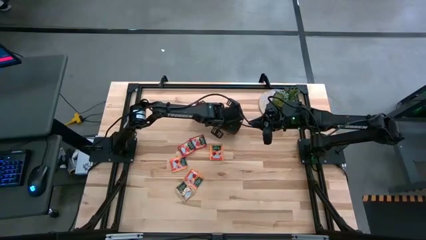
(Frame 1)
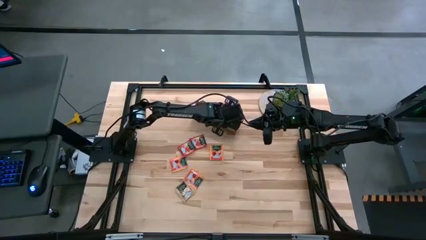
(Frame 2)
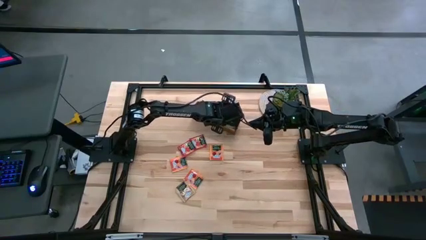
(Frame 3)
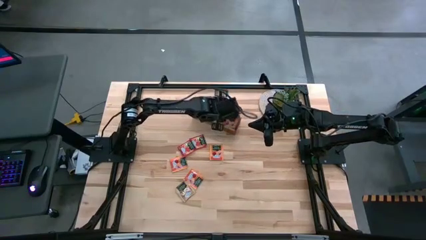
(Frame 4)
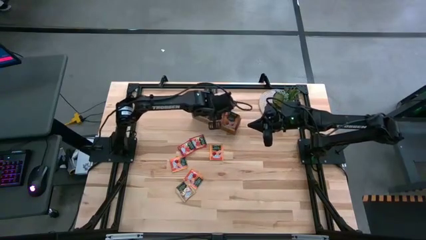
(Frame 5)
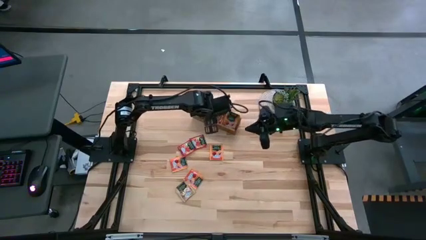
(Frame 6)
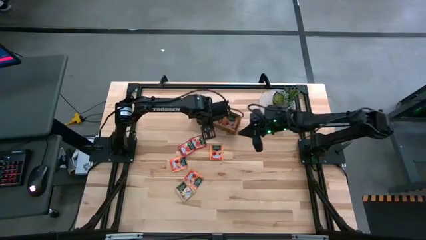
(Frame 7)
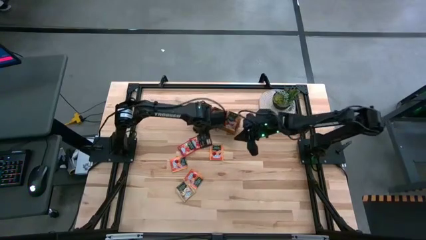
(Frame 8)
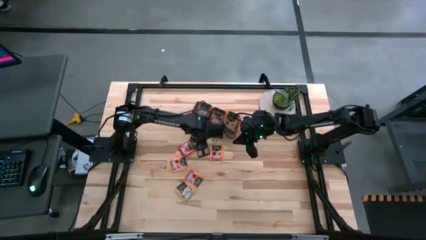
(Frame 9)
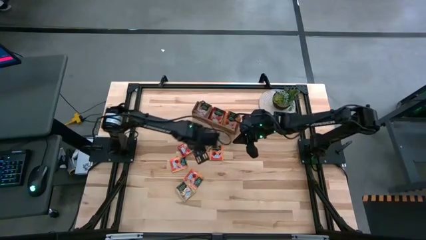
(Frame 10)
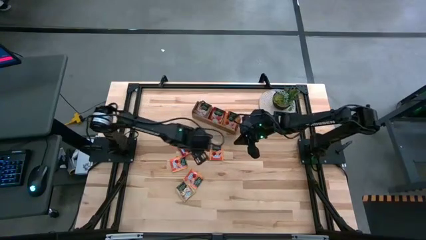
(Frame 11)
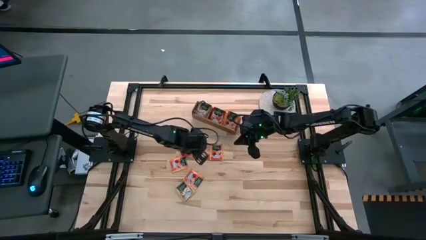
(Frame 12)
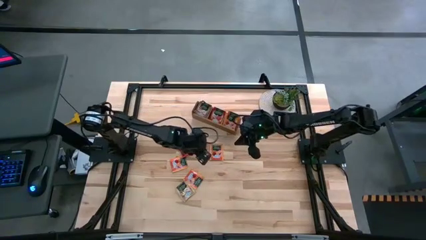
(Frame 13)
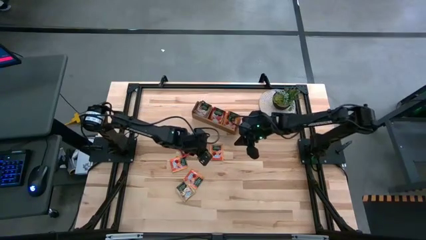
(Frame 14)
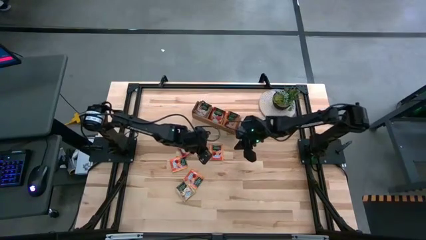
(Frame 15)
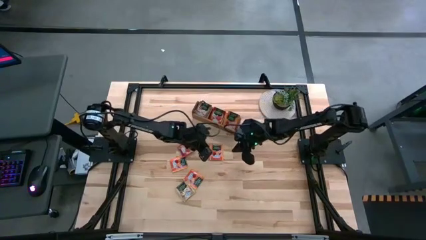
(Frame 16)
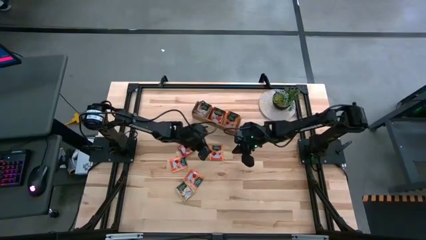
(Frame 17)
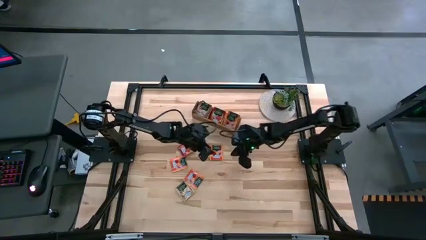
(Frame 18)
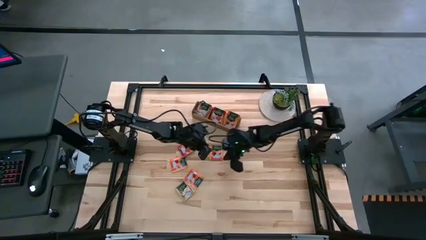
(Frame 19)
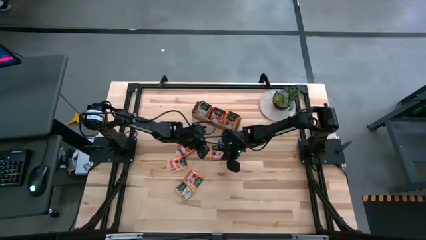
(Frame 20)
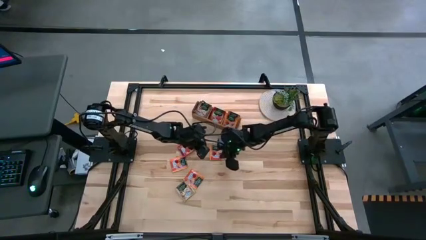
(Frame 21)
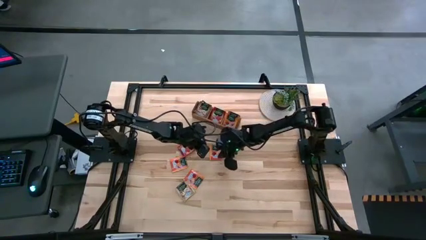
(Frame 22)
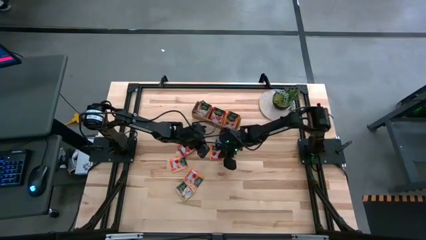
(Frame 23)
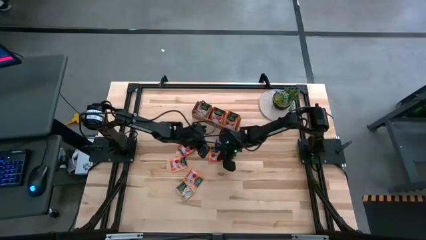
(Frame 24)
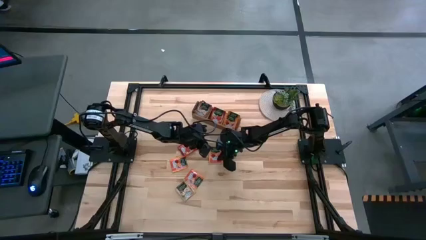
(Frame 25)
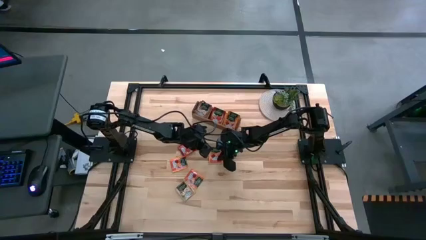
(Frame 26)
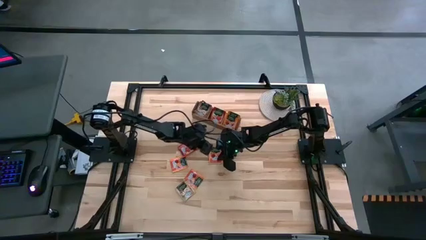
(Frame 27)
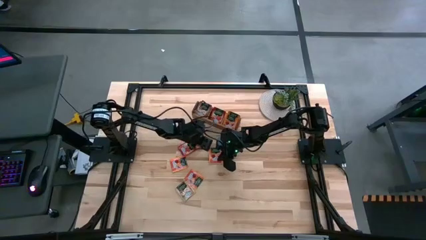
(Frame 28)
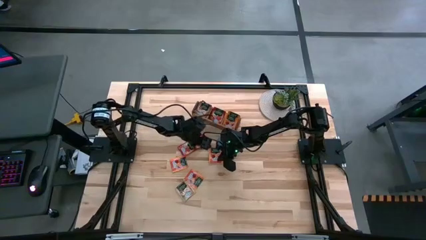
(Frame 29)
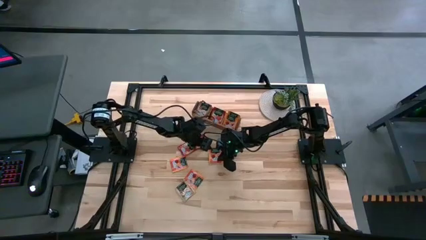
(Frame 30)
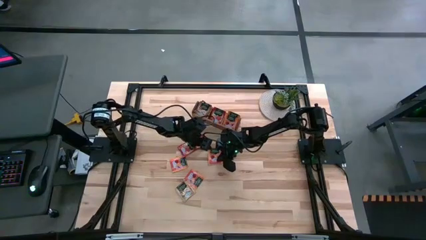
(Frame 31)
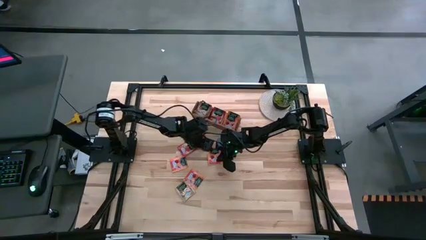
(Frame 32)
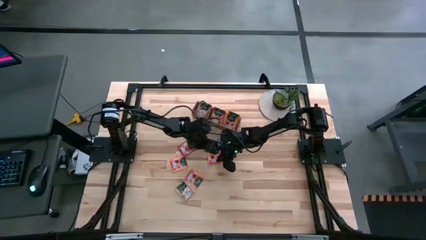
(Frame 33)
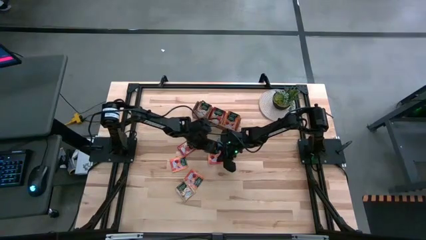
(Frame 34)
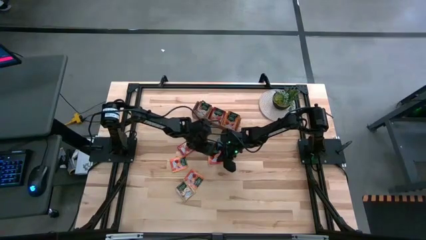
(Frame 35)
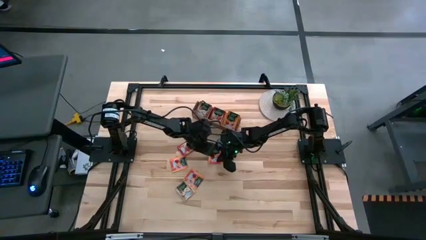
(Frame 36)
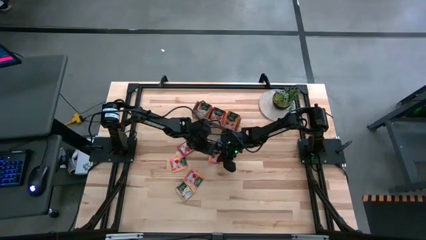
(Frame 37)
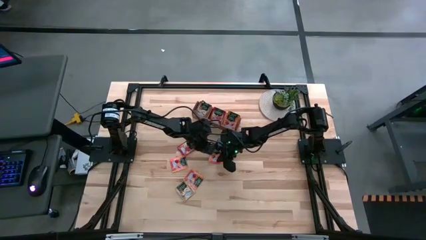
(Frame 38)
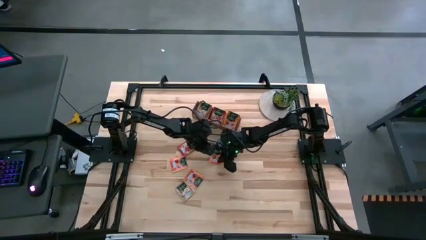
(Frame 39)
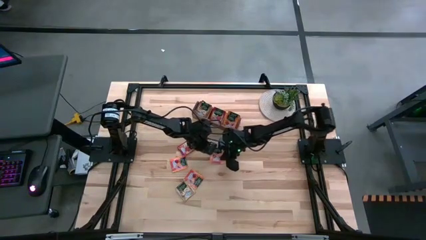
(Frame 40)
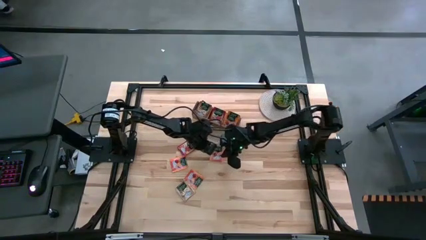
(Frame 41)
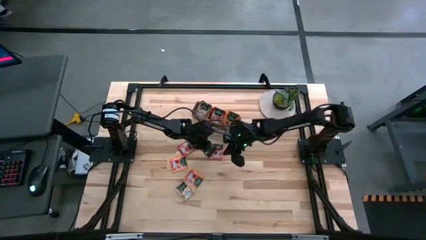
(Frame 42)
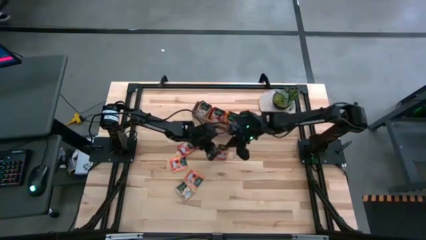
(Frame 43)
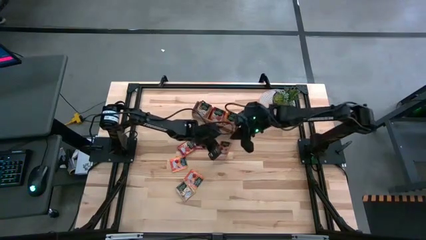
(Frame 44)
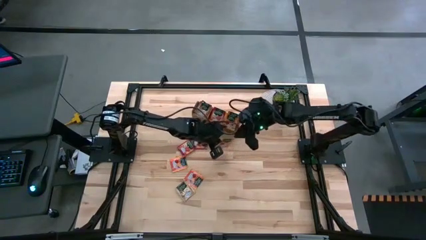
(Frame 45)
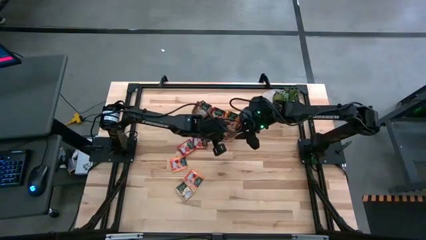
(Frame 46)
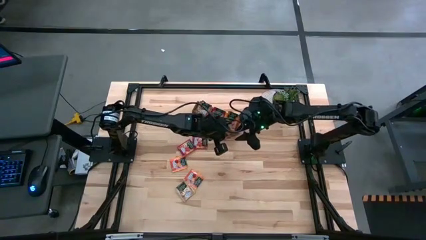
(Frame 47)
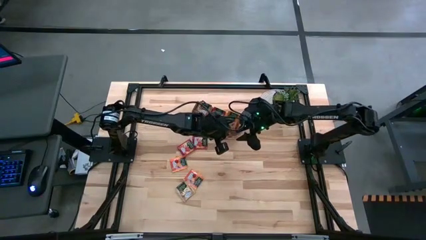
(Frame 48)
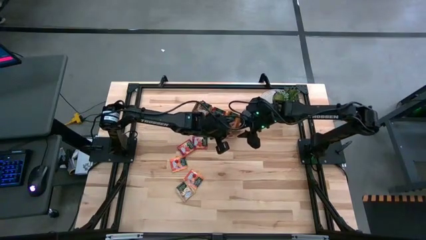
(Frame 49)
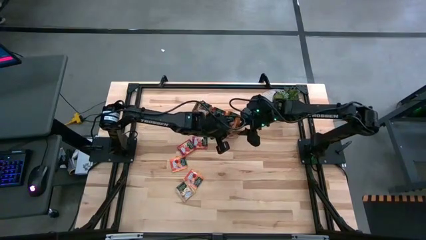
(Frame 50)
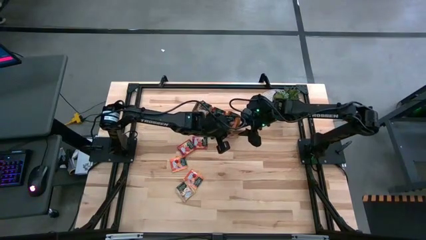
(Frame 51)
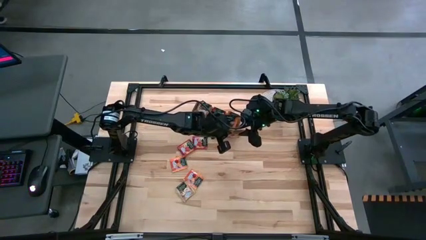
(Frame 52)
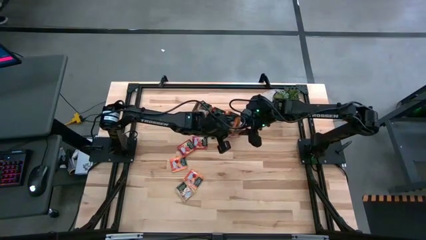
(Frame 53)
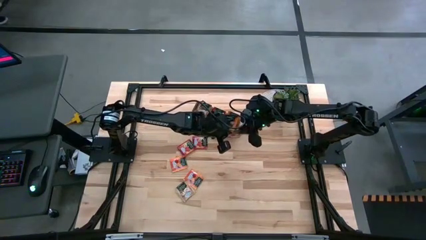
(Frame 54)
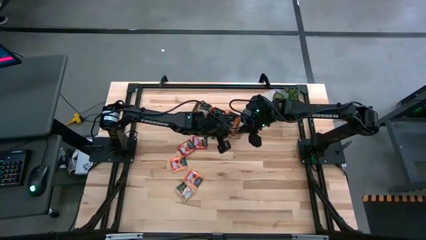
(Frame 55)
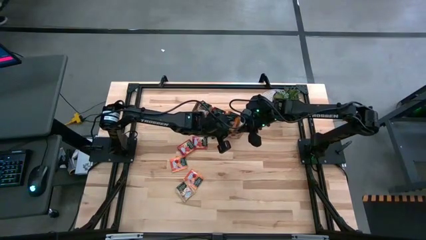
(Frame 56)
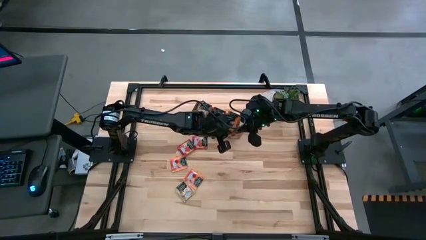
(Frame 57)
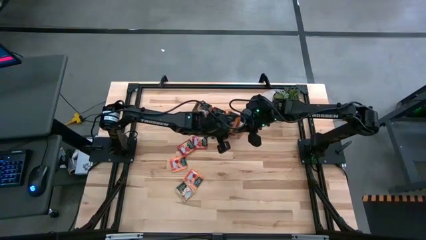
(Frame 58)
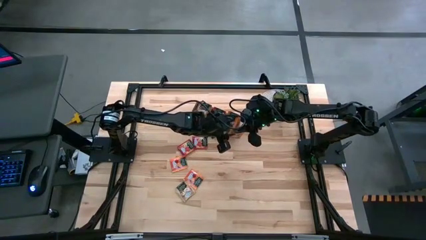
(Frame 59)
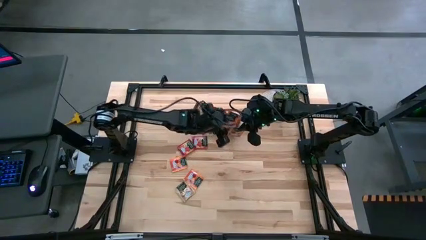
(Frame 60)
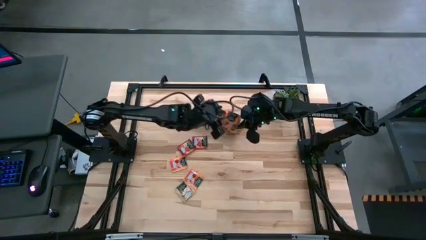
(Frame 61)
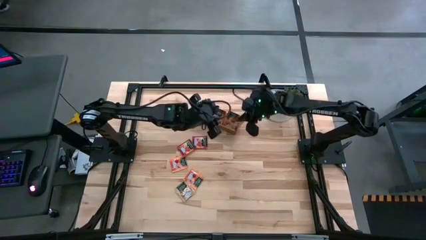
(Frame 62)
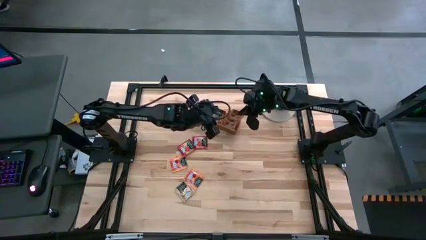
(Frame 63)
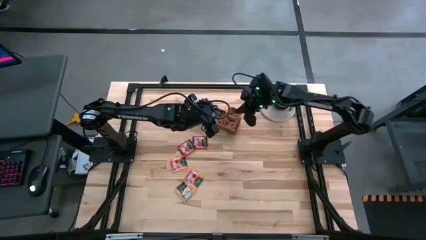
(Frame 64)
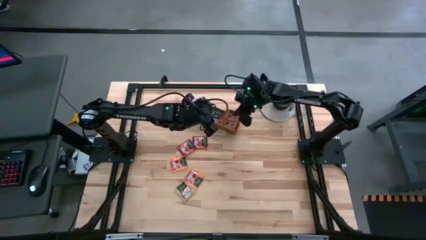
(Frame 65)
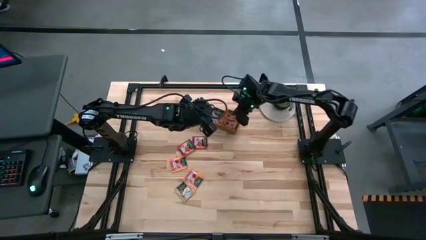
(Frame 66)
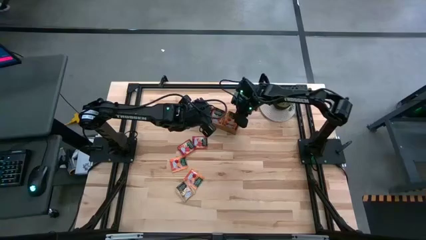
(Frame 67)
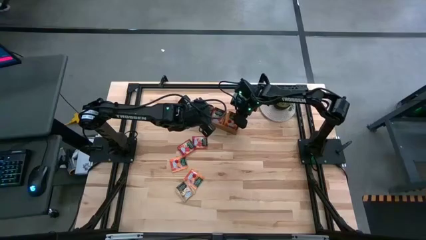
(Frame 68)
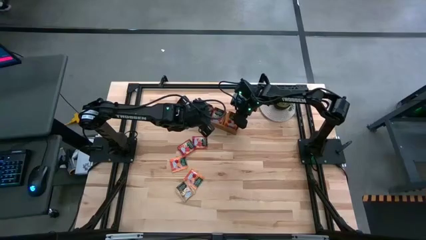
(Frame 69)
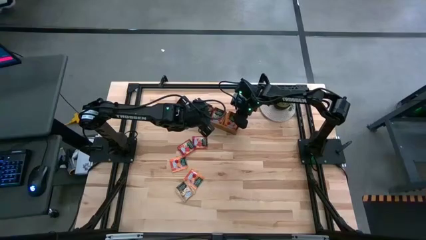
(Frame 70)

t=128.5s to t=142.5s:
Task: Pick & Place Tea
Put the orange tea bag into the right section of the wooden organizer

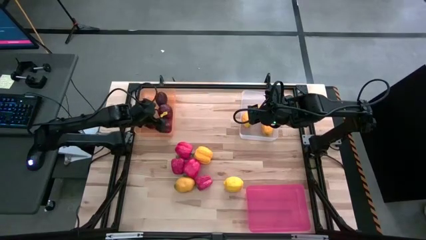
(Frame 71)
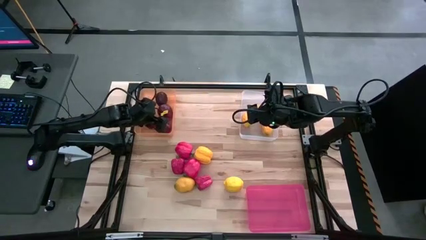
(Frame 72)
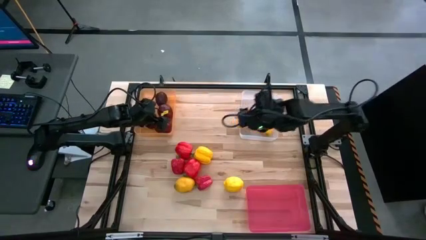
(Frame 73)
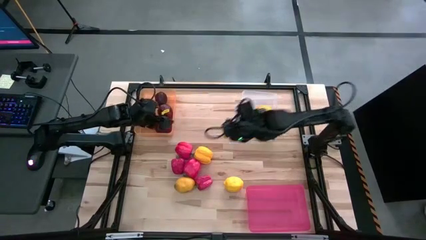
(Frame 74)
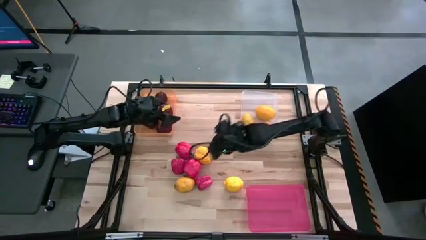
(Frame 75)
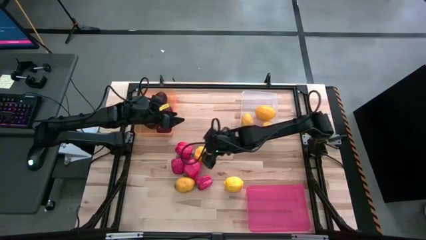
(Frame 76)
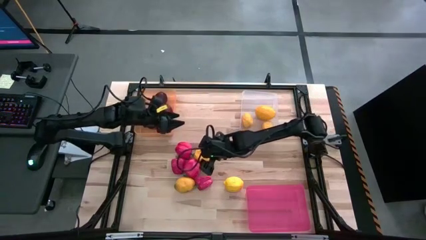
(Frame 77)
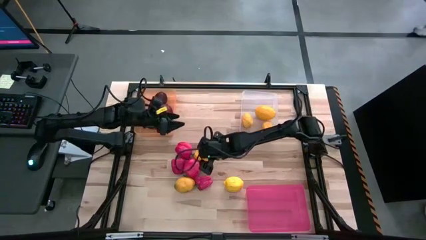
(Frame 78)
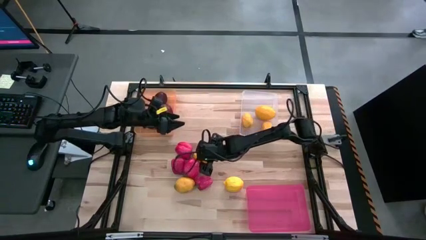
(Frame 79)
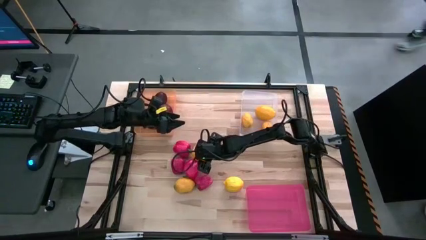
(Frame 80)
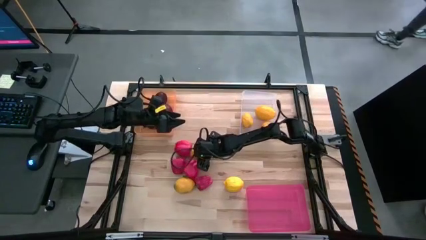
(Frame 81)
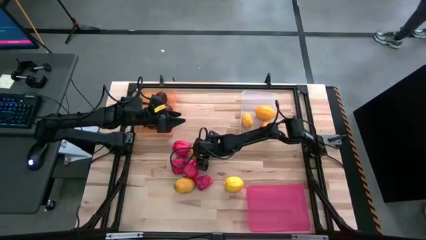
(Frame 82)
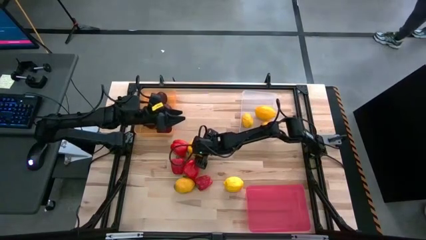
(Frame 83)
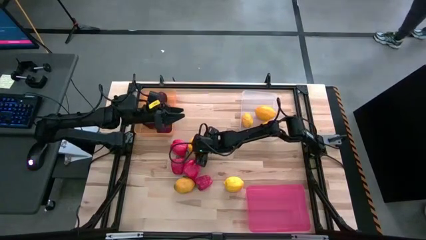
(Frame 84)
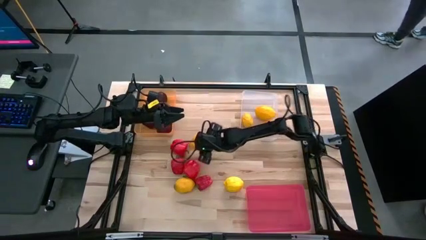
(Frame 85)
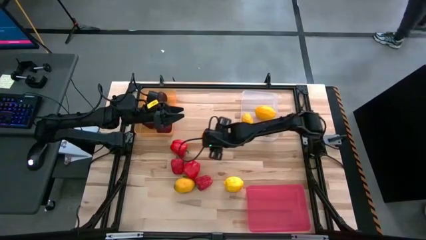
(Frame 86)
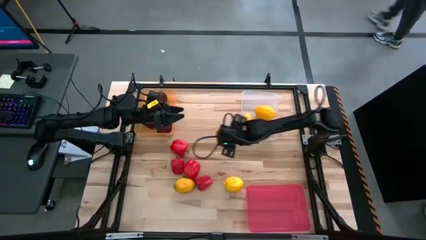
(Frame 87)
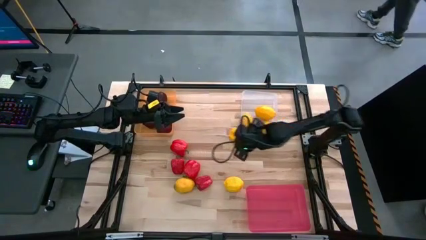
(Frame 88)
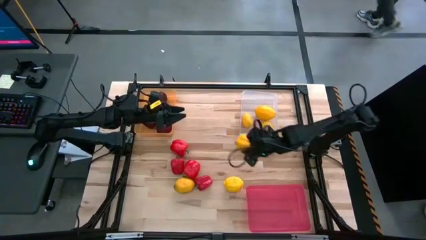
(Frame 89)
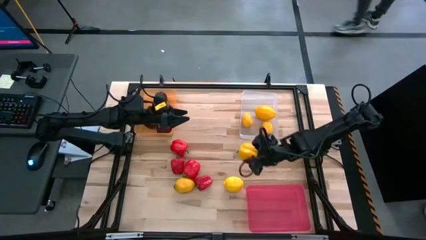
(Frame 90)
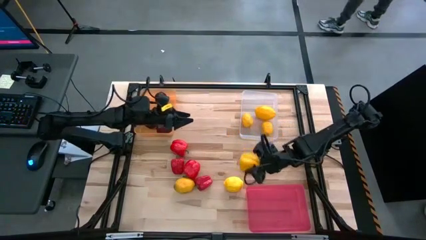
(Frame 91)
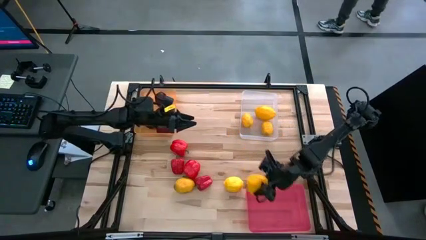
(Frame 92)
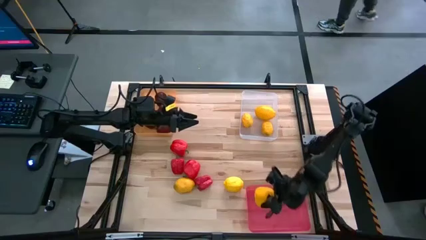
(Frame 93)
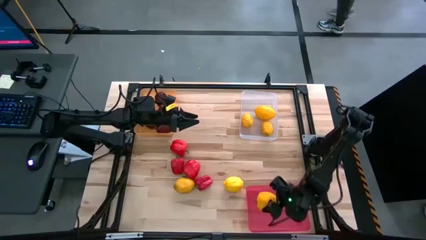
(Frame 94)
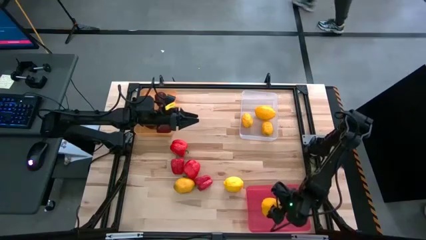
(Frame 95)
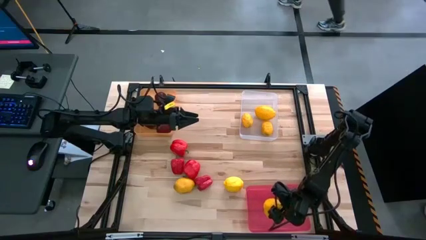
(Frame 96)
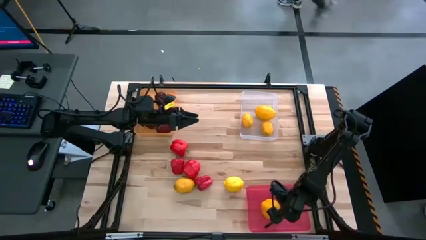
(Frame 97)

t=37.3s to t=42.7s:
Task: Sort produce into baskets
Put the yellow bell pepper into the red bin
